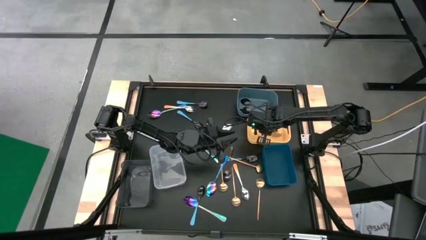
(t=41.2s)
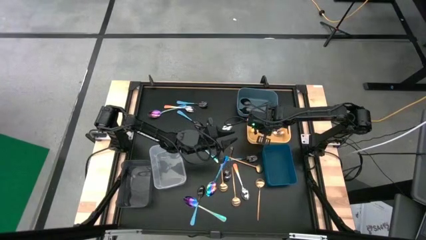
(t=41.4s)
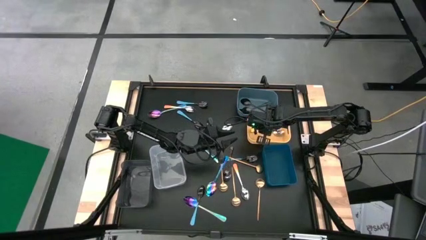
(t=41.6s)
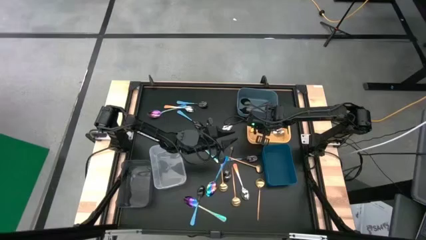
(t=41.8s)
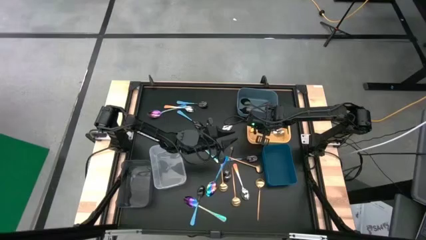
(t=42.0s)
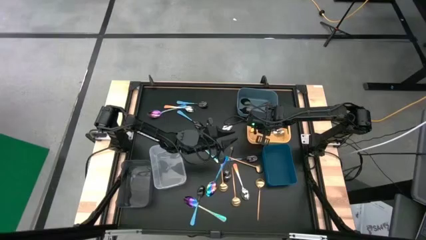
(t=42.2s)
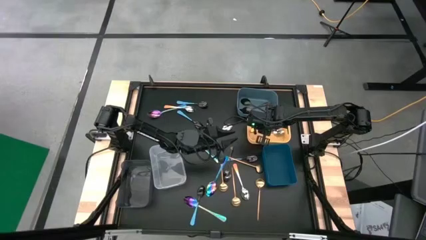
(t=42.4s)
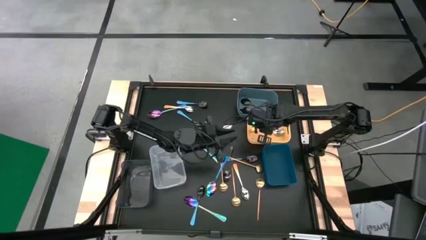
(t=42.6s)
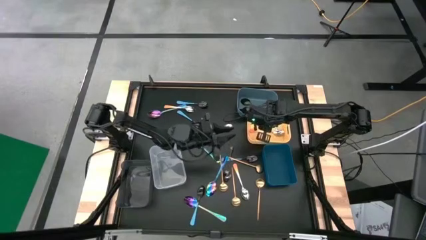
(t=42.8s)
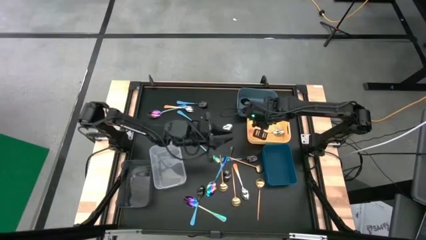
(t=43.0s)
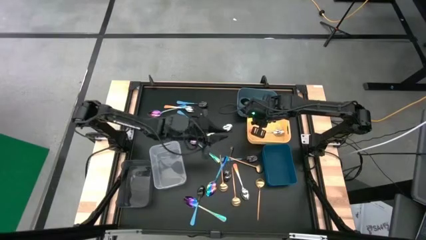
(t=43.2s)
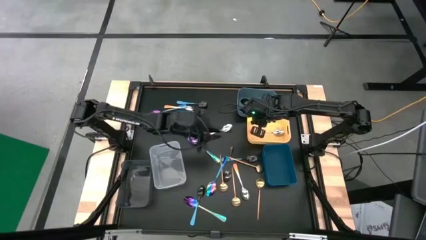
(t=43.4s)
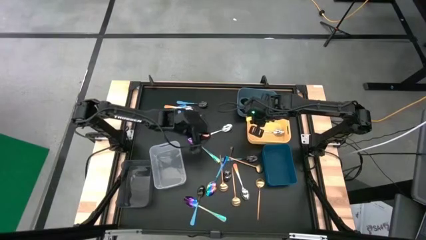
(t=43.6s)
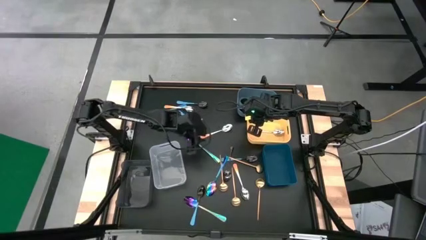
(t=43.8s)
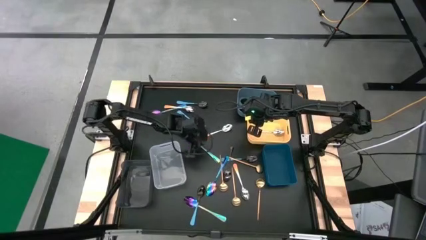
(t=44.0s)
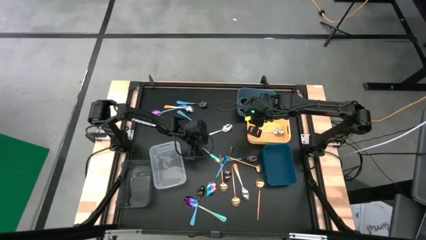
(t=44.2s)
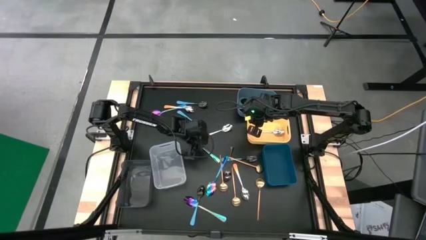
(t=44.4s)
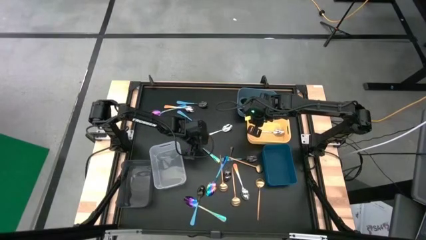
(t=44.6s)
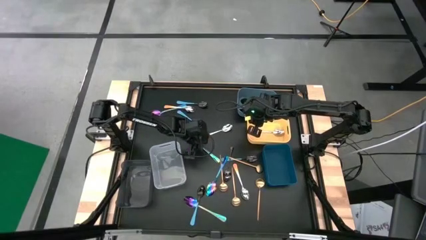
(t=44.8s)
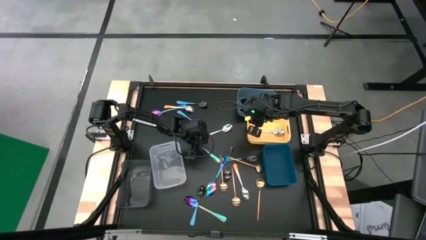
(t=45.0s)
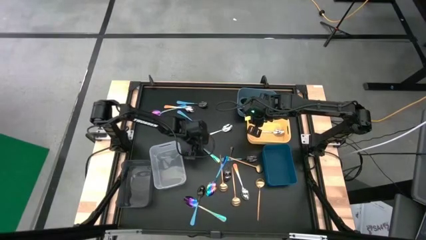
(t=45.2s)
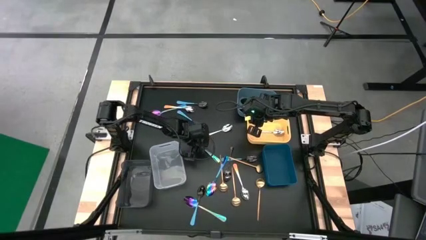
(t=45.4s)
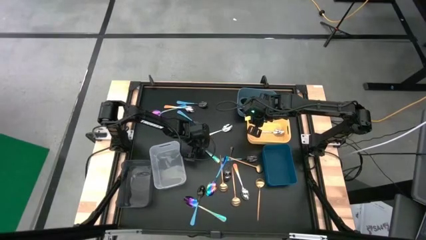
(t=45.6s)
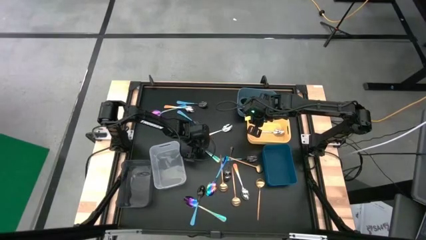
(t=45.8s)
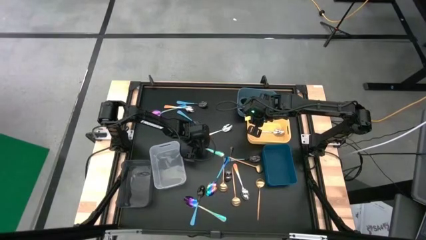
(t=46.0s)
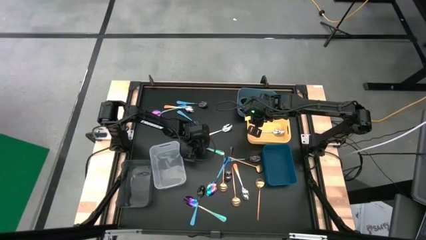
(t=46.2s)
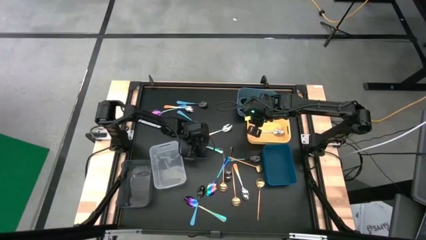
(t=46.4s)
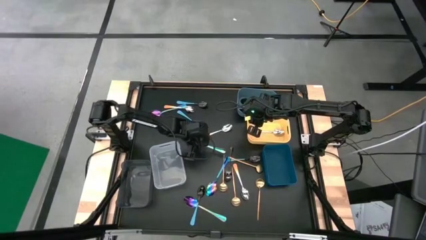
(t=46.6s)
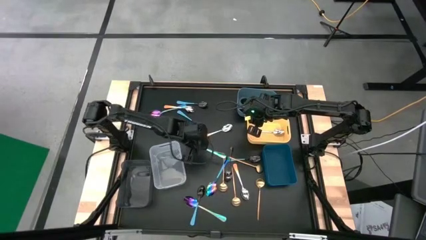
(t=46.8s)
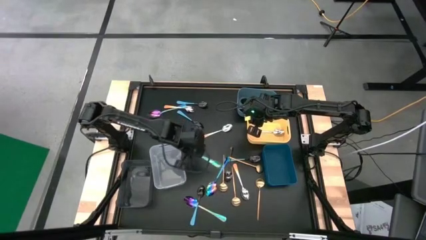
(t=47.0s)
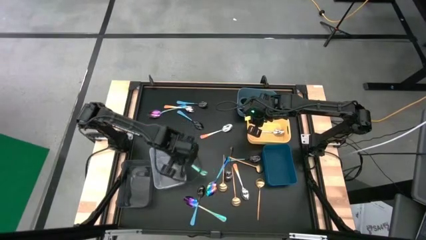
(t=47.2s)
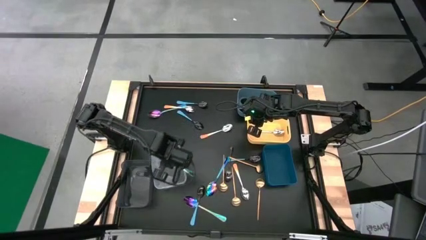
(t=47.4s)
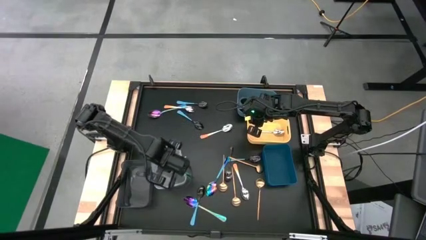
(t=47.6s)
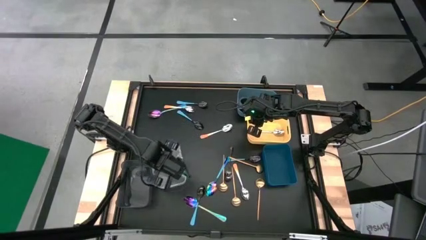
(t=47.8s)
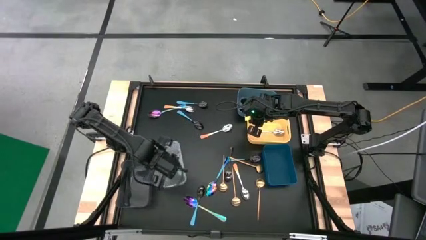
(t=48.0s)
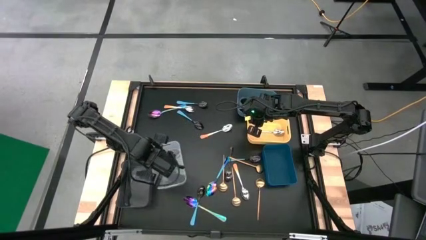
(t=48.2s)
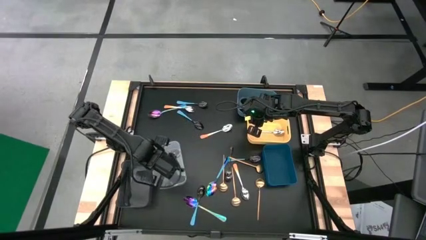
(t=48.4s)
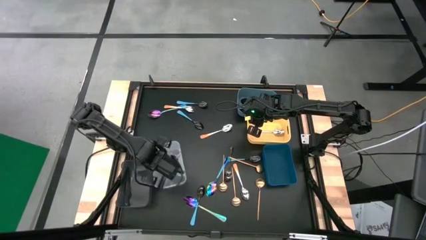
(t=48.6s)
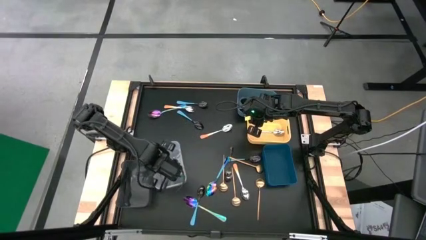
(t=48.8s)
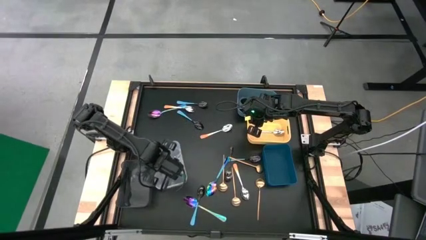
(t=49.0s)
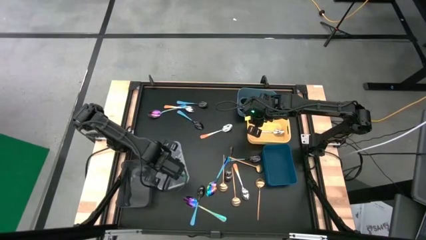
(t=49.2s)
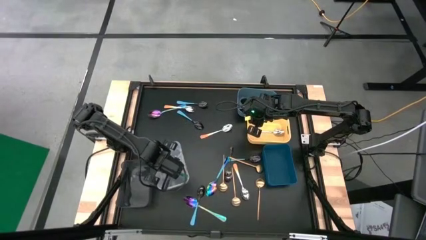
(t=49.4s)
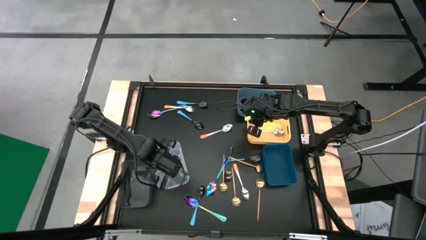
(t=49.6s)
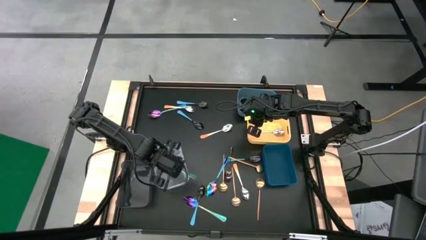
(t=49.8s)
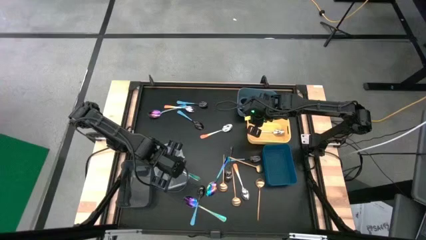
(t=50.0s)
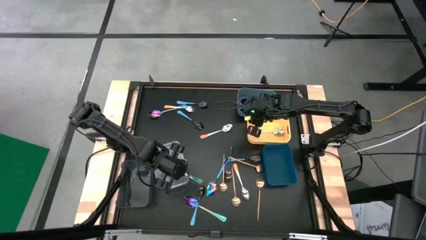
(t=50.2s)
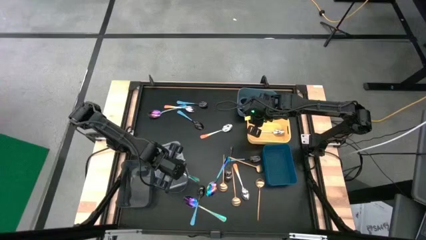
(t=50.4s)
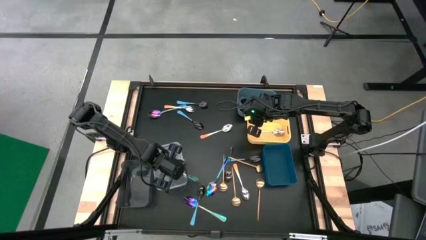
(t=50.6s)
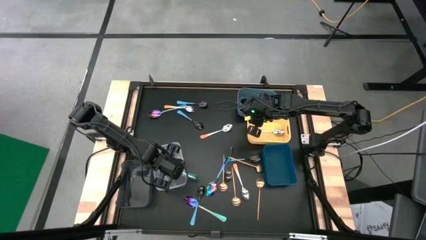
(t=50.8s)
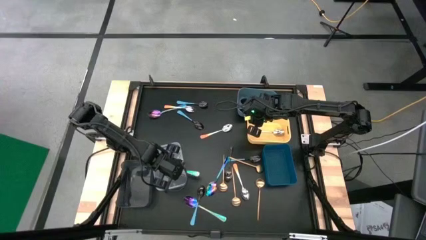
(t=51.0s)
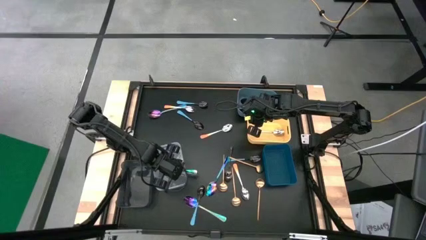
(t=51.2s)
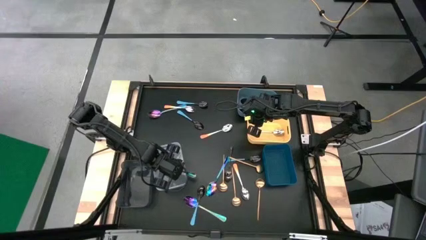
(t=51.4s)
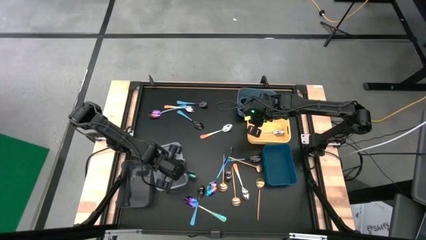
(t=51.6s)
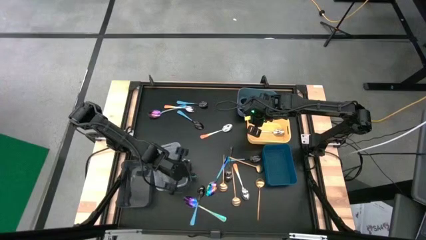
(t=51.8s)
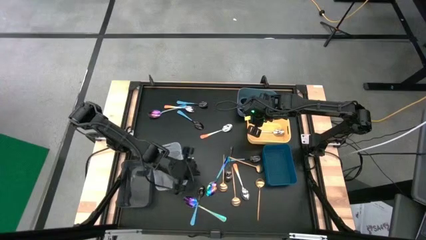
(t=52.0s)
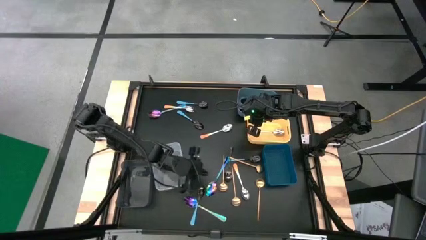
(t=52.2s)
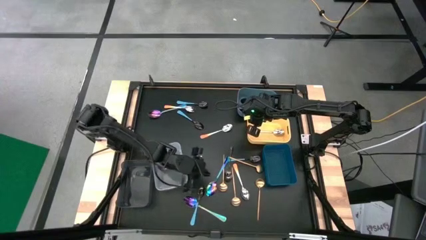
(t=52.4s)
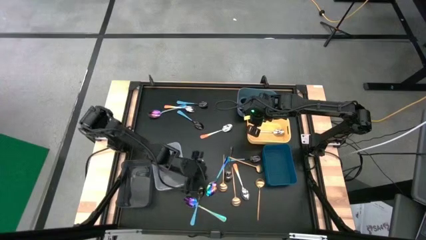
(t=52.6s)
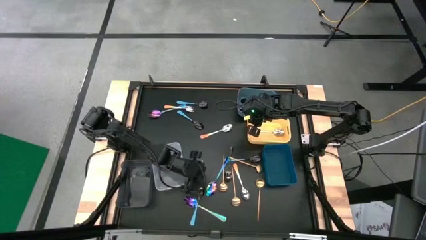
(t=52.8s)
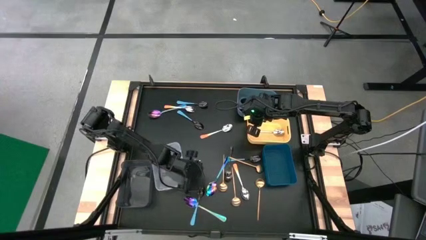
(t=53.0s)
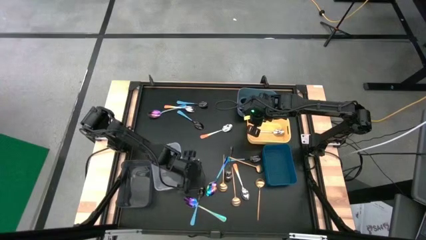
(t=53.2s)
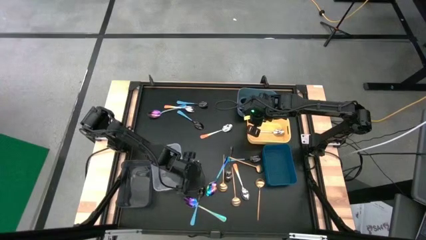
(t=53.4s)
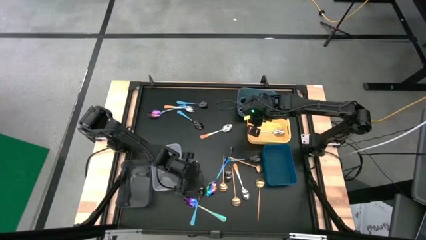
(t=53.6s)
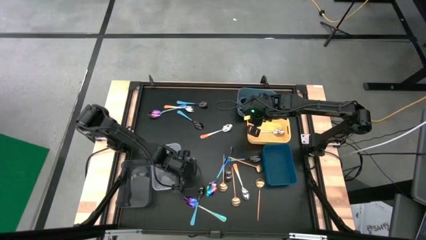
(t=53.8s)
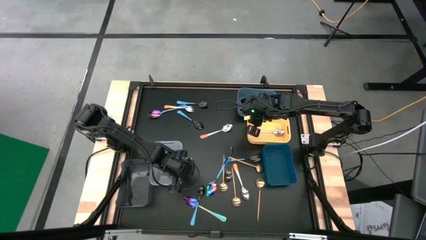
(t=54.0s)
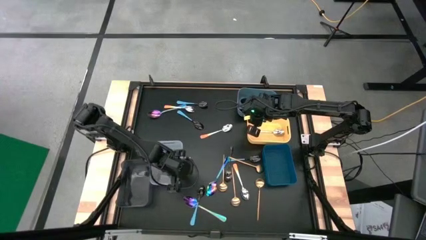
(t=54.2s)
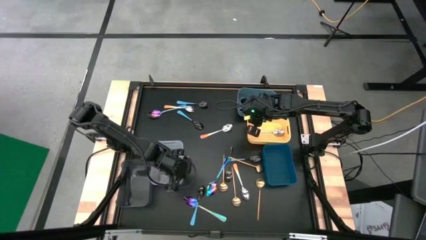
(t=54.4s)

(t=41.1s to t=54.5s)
Task: Sort silverware by color (type)
Put the purple spoon into the transparent bin
